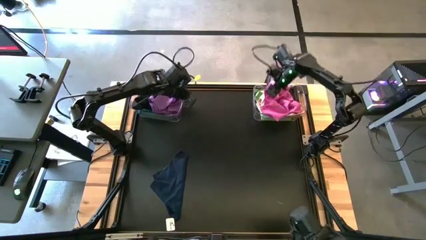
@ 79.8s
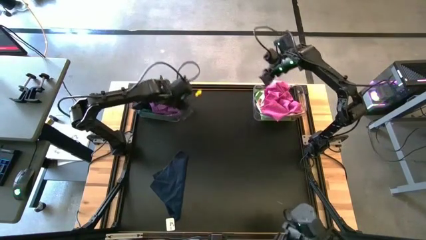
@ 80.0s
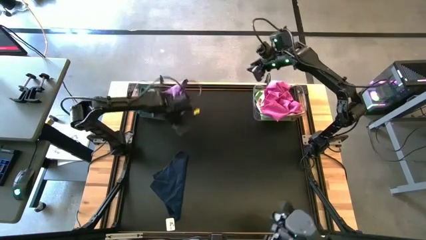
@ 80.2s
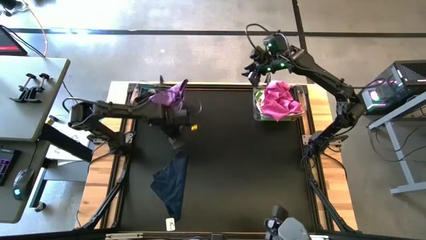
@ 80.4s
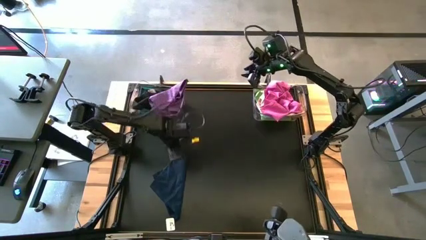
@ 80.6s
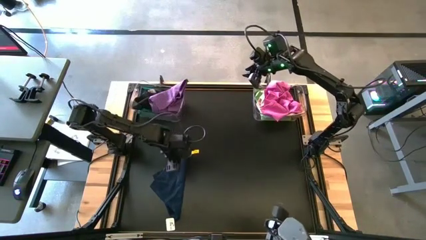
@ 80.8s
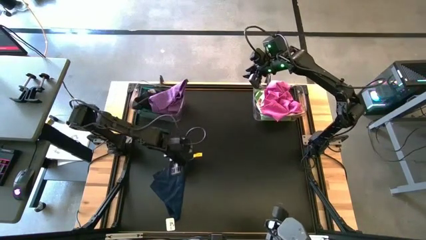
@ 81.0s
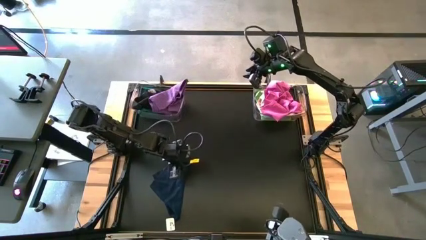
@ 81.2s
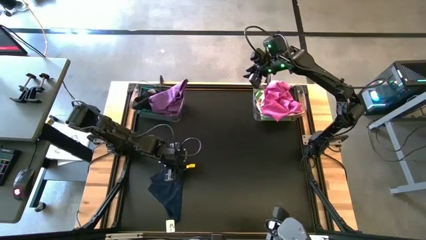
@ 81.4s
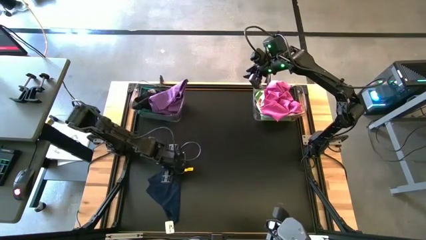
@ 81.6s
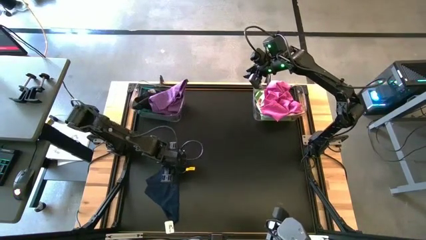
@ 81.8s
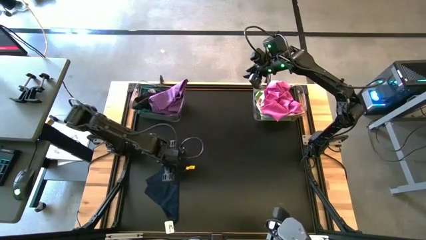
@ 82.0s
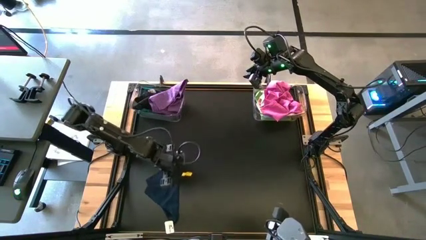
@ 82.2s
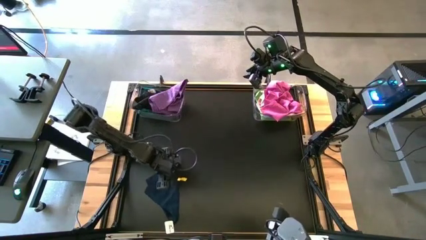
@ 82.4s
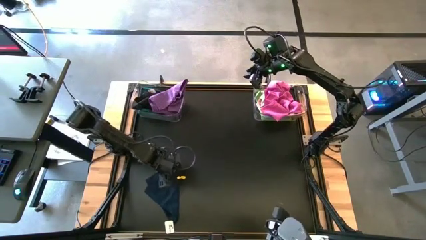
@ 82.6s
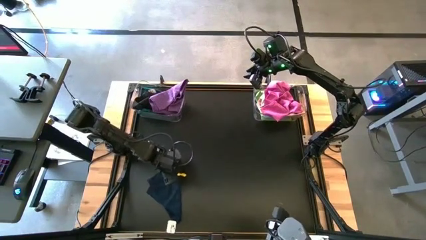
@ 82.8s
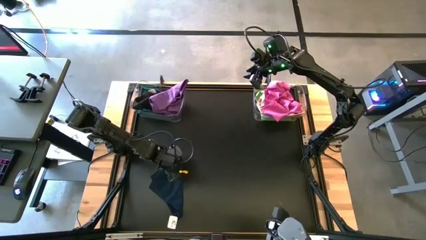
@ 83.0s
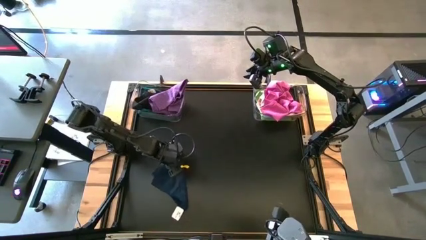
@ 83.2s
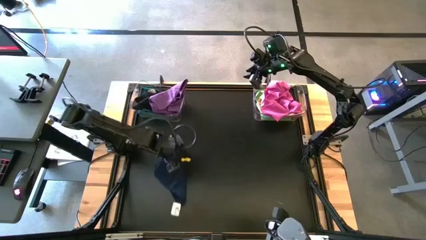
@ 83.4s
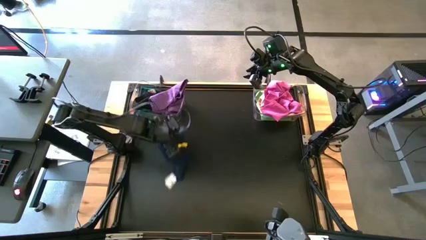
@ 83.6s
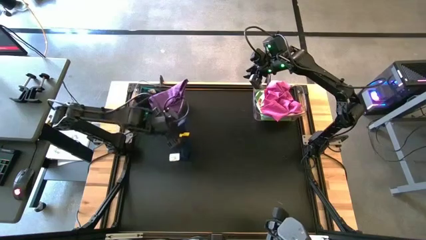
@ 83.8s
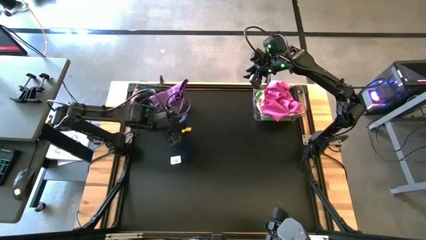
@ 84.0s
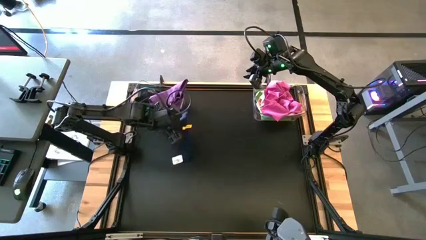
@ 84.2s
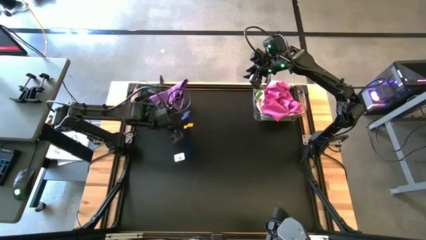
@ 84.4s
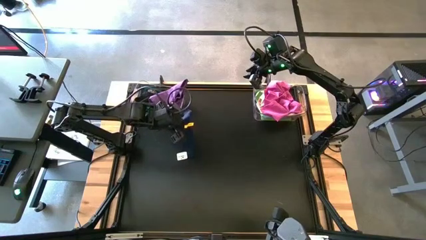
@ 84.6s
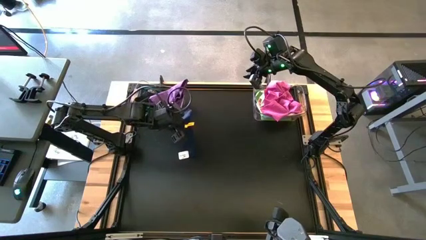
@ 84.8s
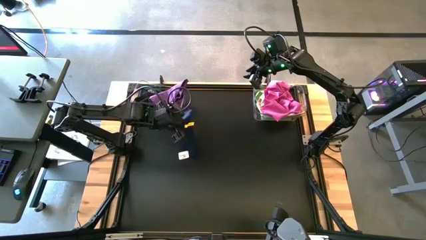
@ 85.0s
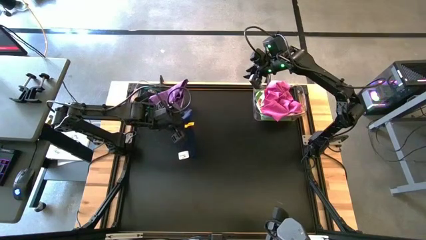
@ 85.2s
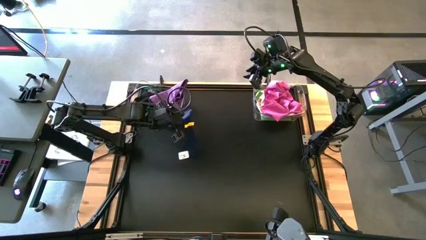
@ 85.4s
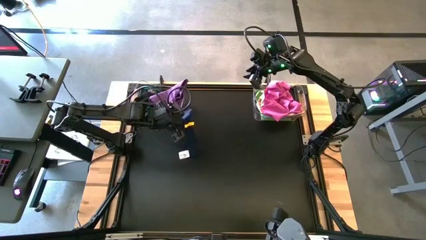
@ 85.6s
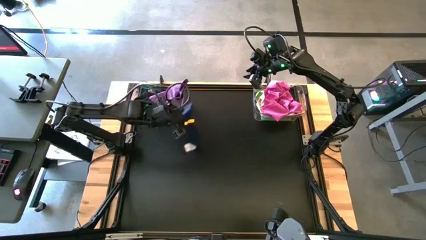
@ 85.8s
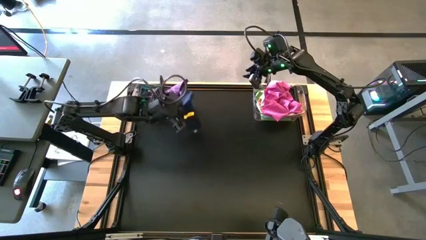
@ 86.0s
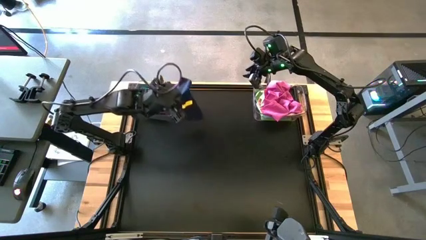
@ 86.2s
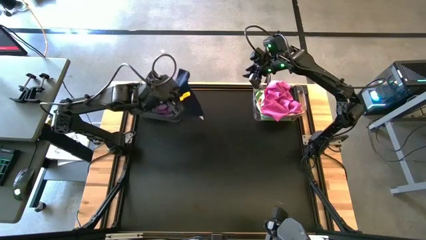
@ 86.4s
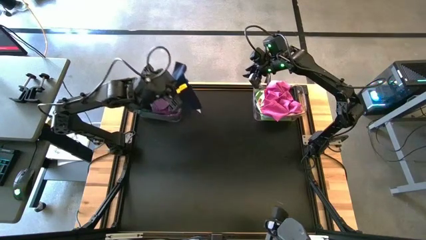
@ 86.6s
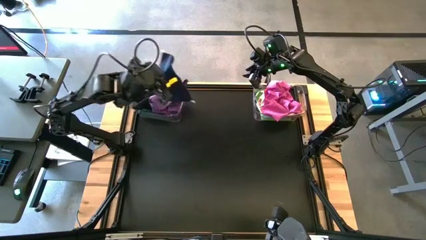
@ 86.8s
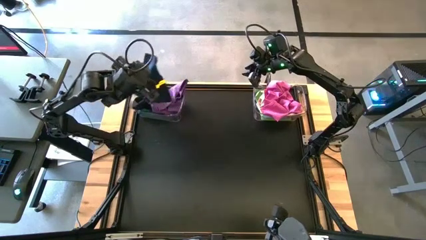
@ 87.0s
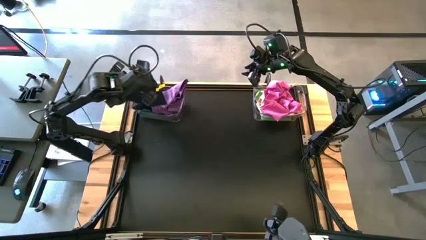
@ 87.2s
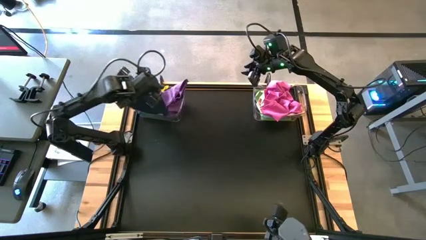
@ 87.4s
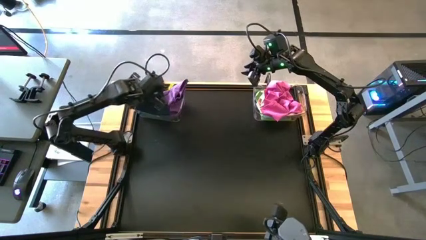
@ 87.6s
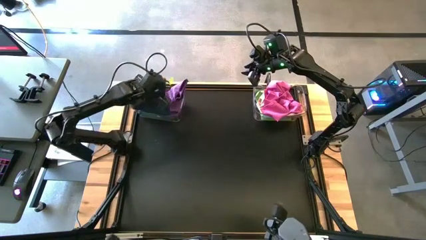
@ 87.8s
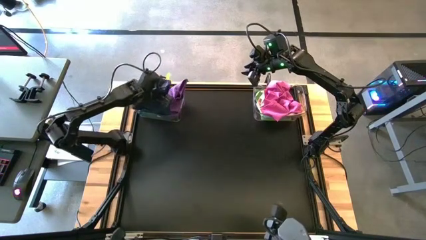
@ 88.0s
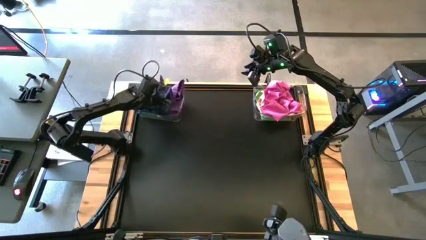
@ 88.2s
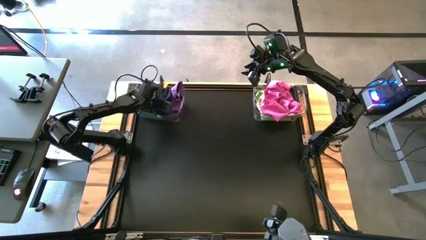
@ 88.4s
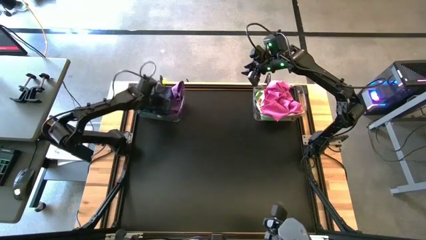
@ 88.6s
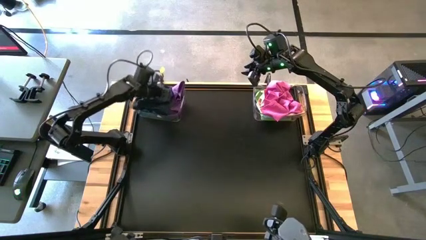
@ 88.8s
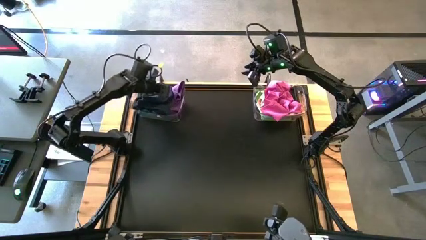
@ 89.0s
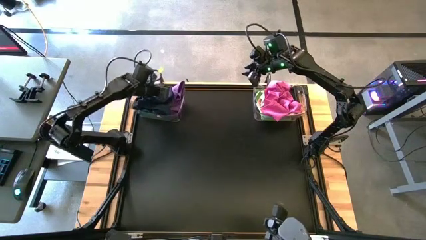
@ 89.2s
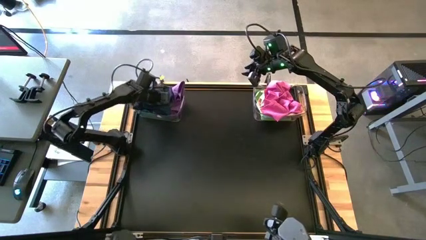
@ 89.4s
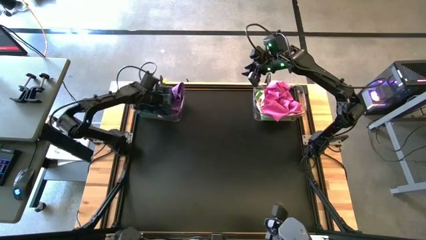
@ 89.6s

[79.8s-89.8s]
Task: Sort towels by color in basket
Put the dark blue kitchen towel into the left transparent bin

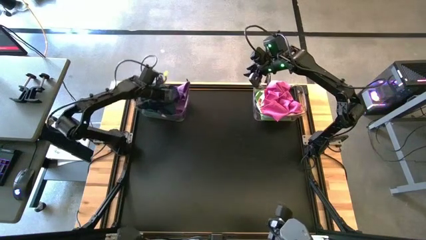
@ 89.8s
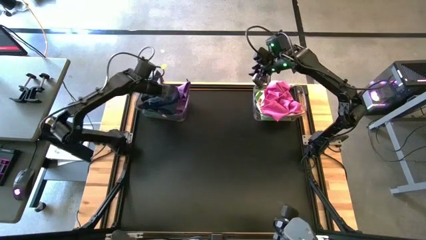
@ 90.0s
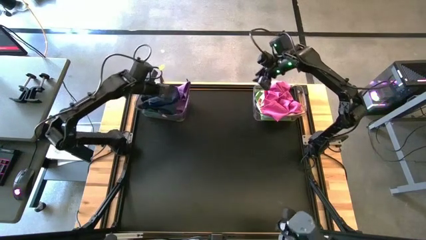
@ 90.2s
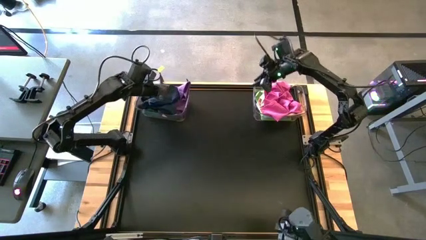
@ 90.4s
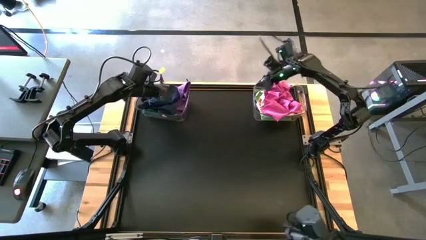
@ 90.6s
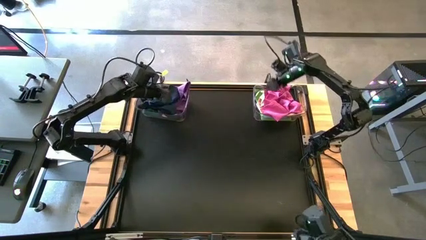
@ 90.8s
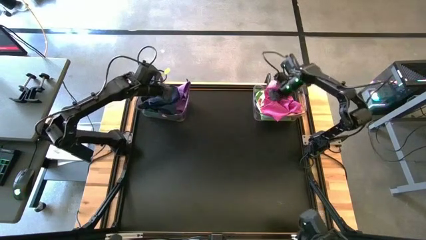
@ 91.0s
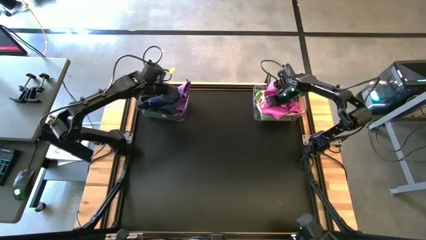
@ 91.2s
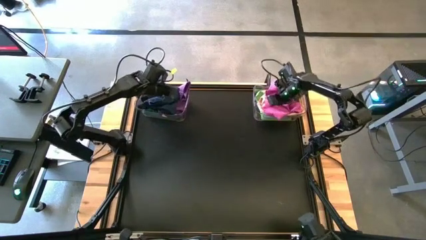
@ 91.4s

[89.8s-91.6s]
Adjust the pink towel in the right transparent bin

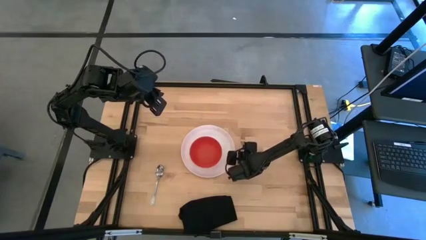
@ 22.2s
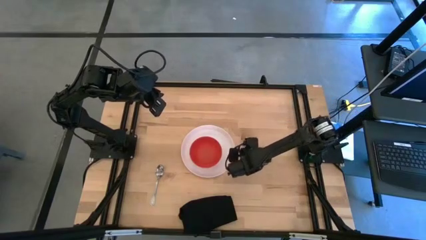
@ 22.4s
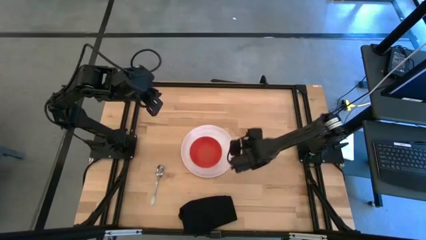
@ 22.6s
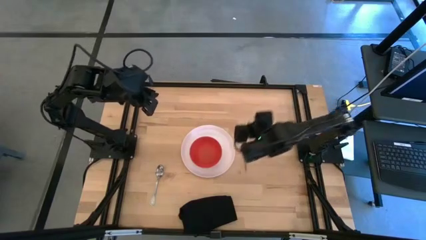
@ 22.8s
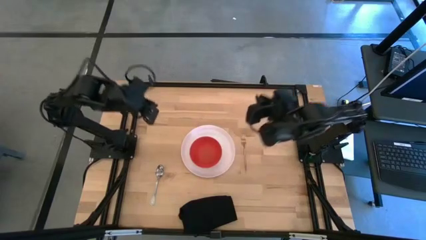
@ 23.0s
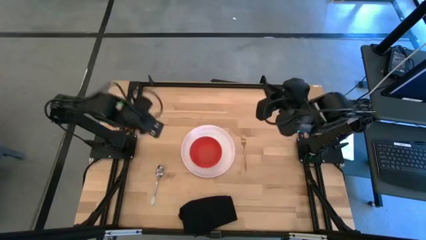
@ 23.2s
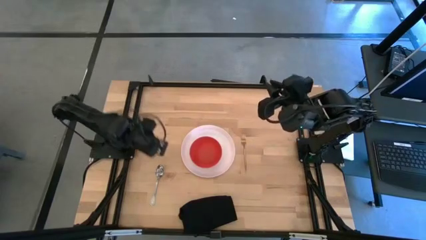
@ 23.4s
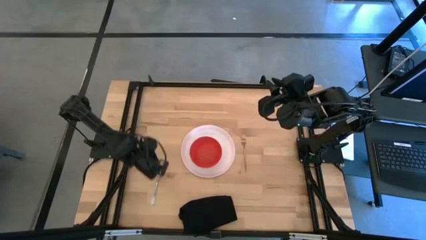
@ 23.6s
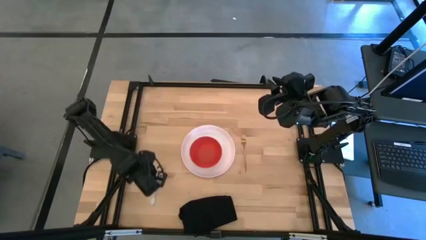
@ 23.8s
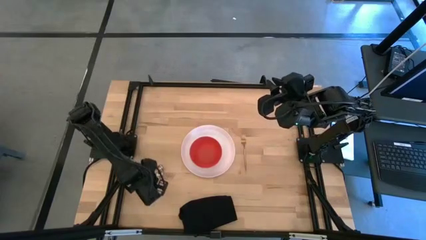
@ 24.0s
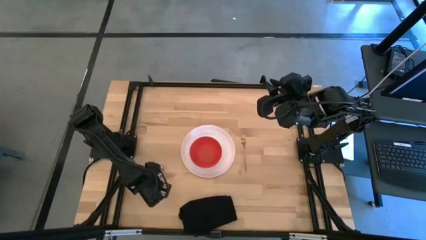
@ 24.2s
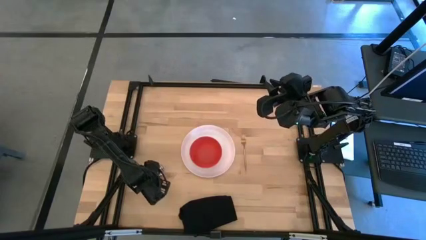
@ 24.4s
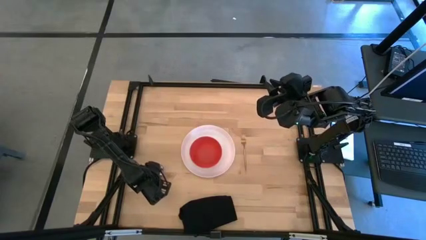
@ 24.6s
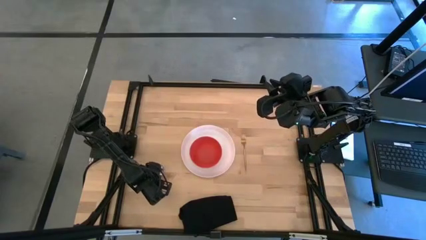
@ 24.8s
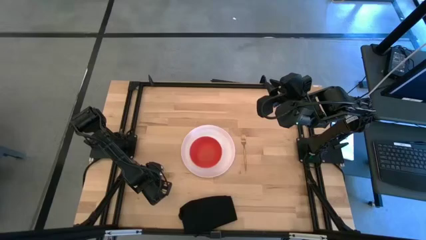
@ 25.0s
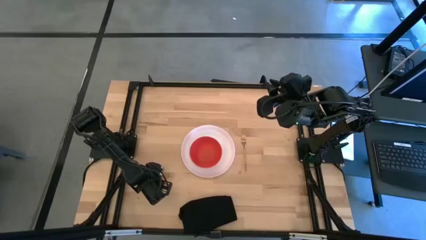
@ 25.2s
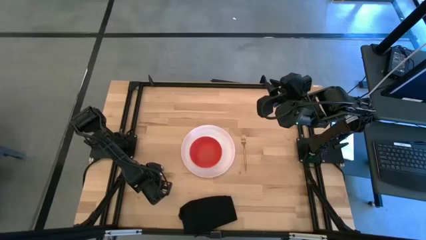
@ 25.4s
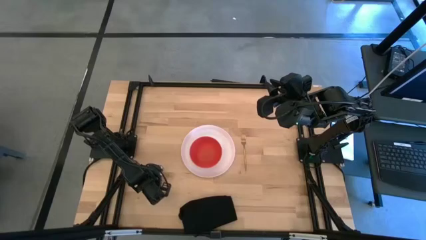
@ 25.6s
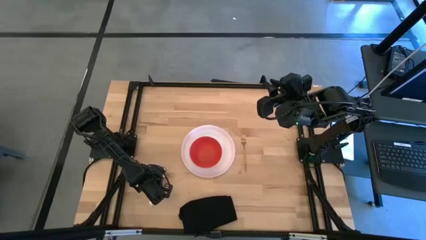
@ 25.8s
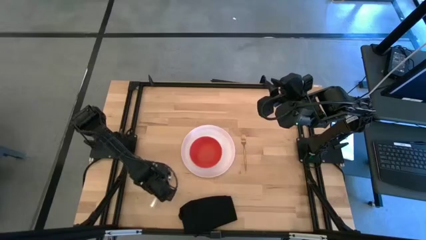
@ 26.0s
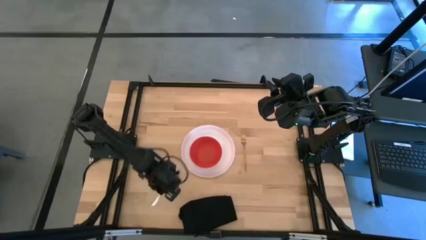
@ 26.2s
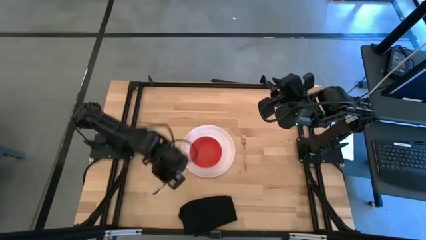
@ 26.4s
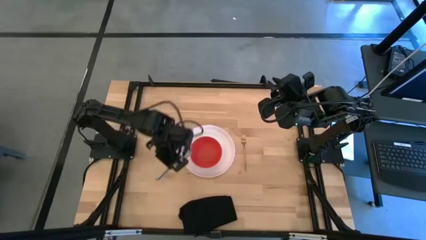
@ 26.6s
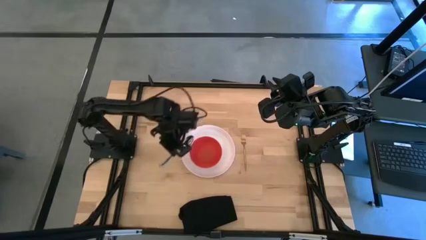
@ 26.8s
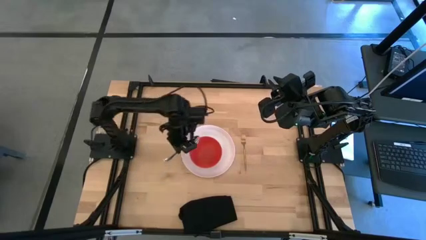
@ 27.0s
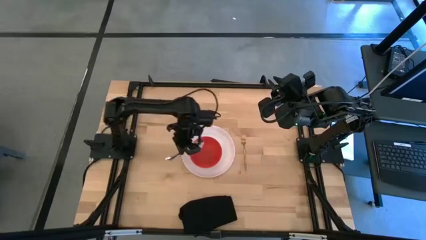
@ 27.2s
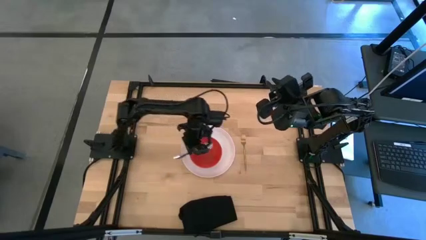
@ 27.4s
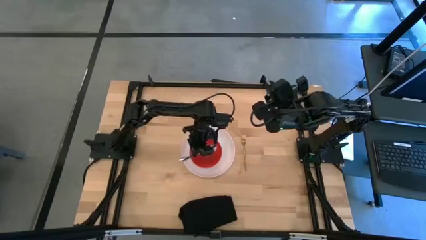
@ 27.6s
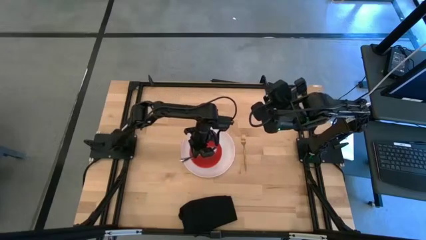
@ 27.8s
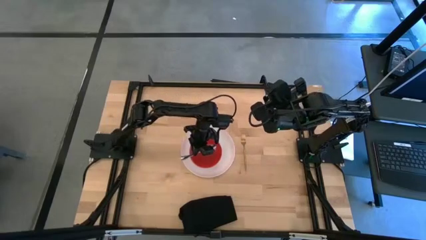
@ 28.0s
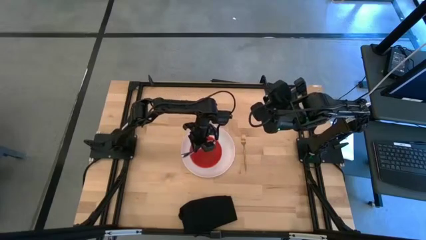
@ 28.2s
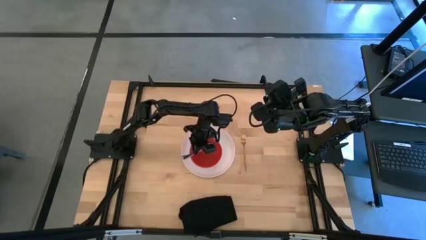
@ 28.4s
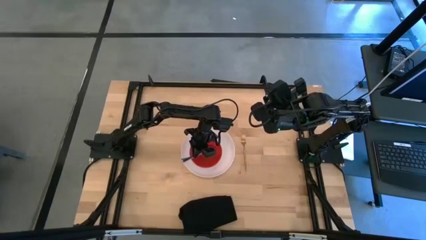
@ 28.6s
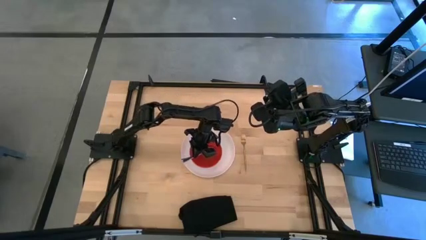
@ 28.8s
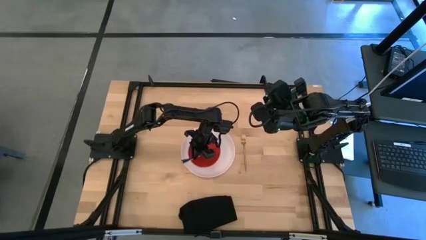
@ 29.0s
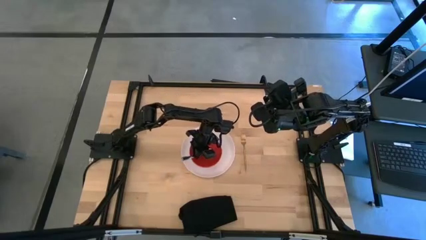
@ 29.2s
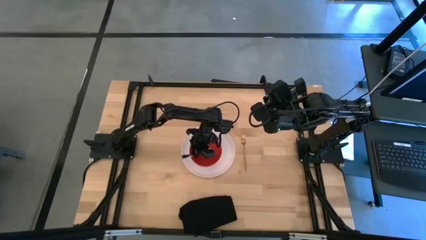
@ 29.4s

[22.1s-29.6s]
Task: Set table place
Put the silver spoon on the red bowl
